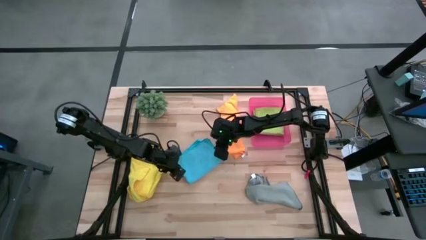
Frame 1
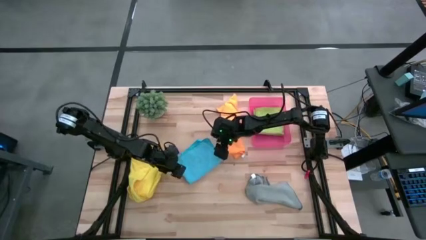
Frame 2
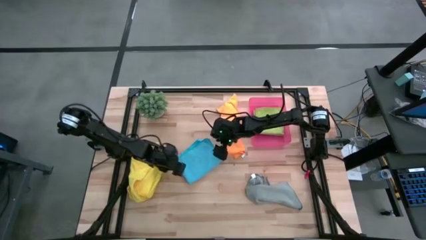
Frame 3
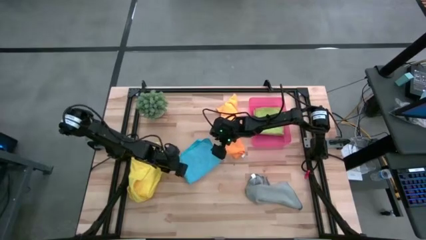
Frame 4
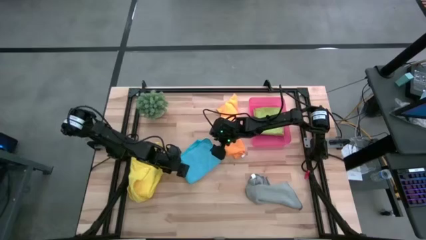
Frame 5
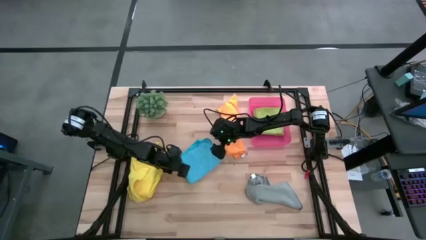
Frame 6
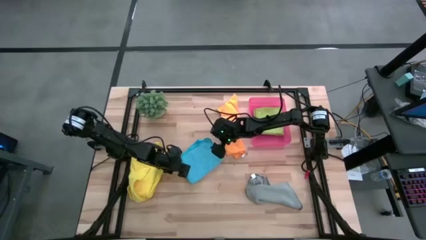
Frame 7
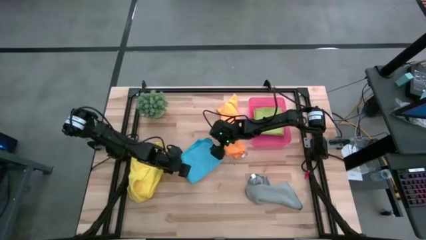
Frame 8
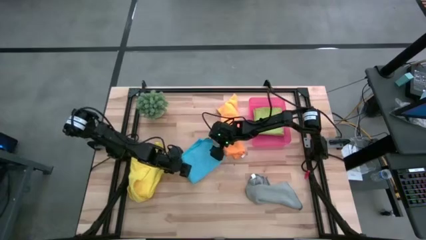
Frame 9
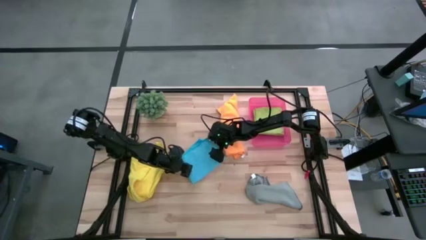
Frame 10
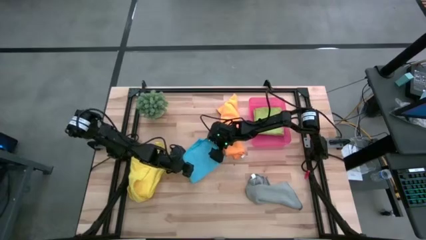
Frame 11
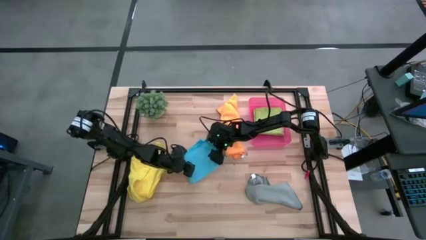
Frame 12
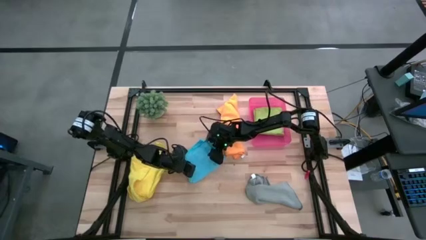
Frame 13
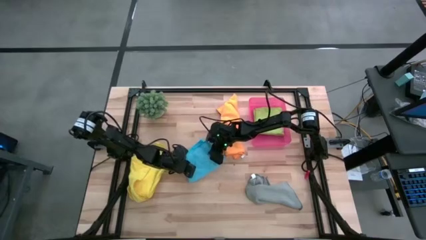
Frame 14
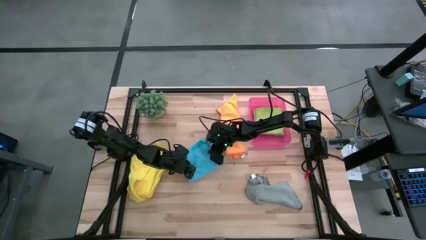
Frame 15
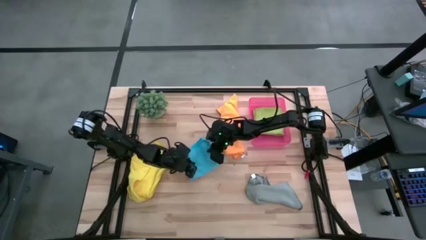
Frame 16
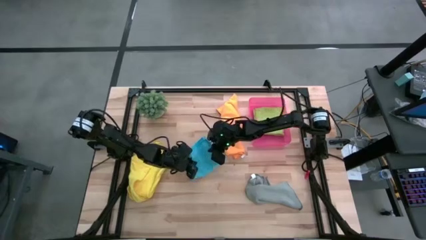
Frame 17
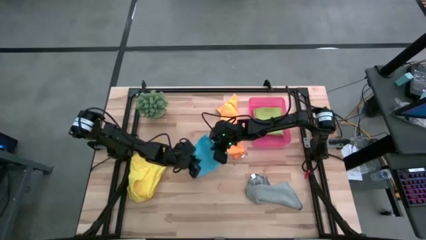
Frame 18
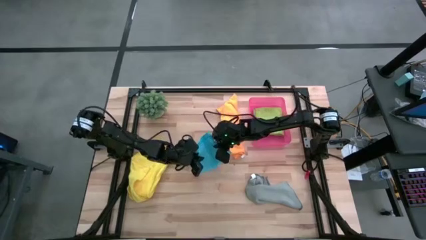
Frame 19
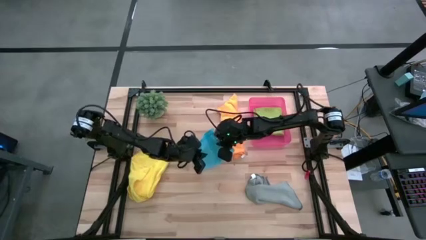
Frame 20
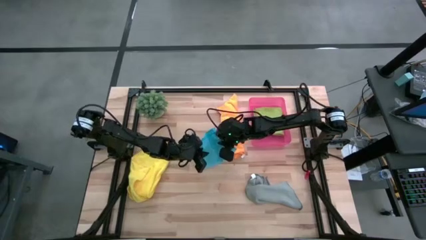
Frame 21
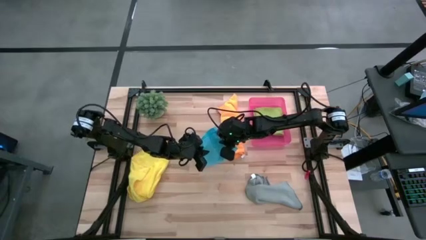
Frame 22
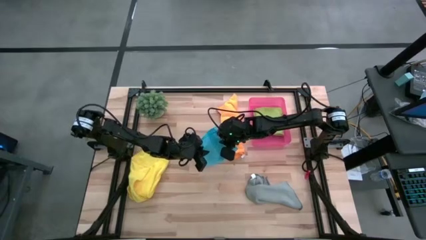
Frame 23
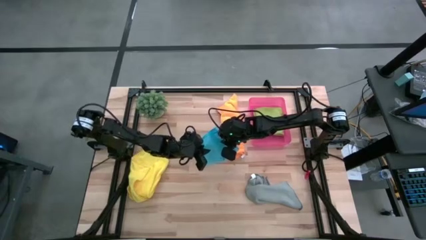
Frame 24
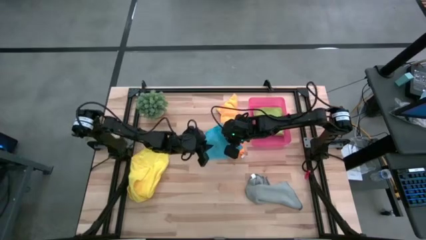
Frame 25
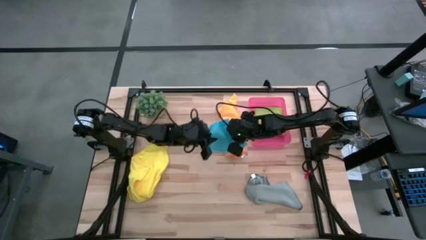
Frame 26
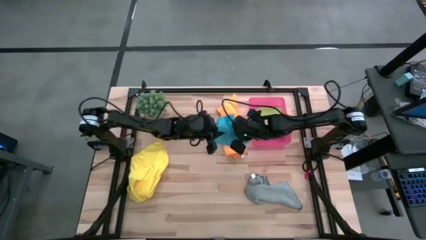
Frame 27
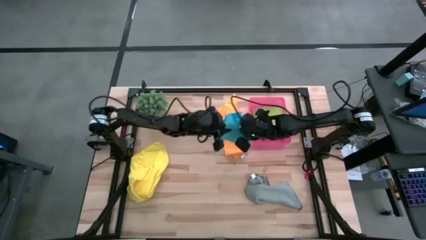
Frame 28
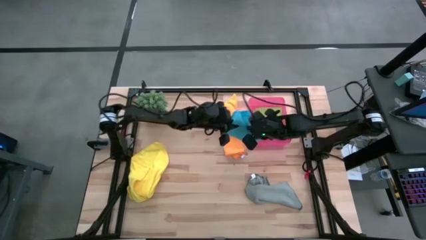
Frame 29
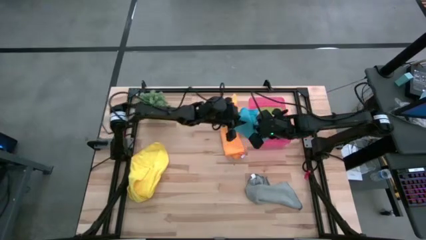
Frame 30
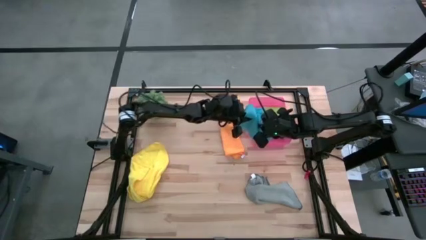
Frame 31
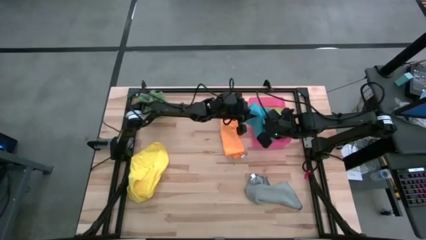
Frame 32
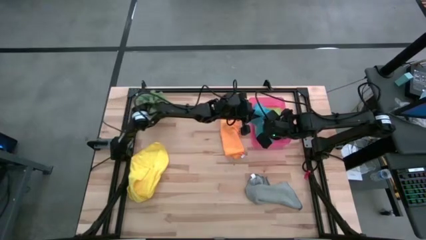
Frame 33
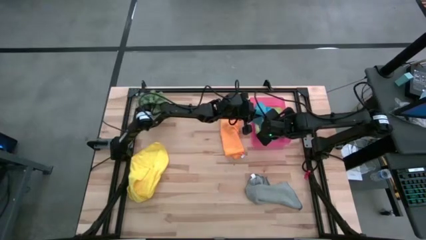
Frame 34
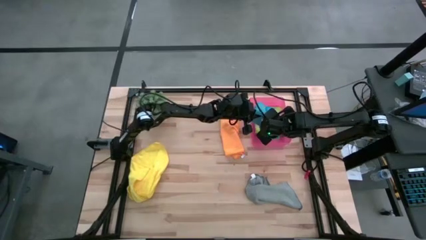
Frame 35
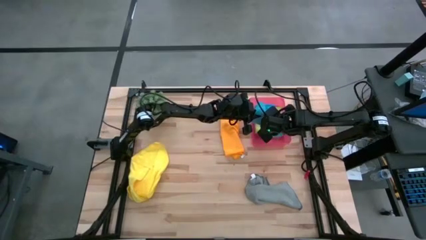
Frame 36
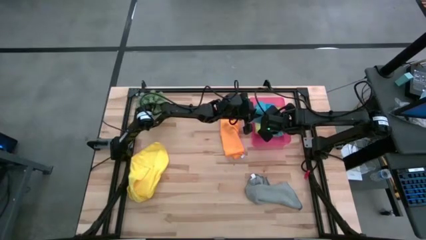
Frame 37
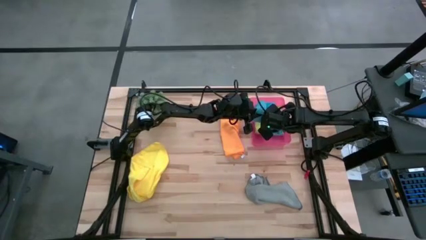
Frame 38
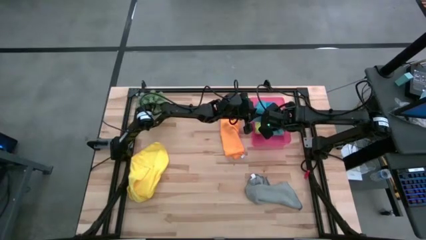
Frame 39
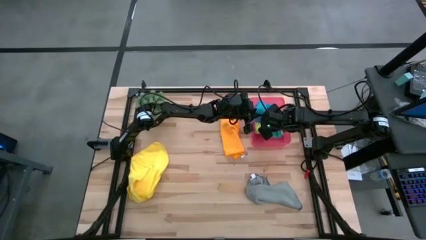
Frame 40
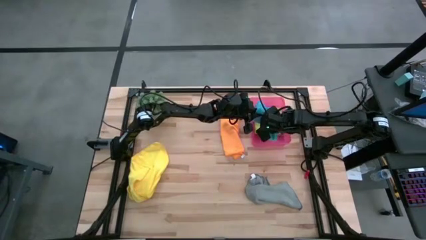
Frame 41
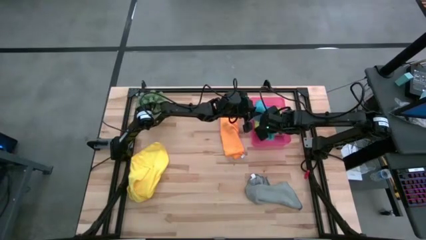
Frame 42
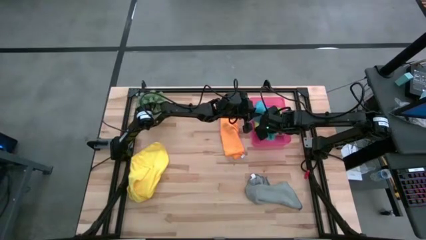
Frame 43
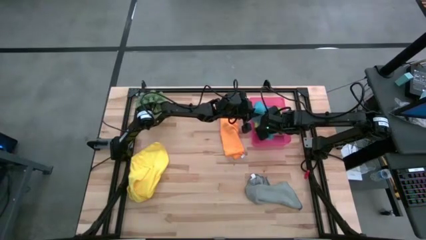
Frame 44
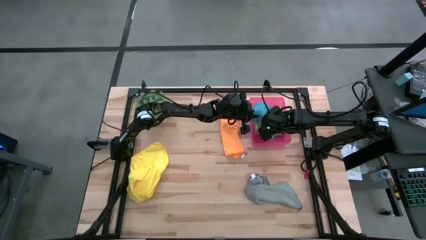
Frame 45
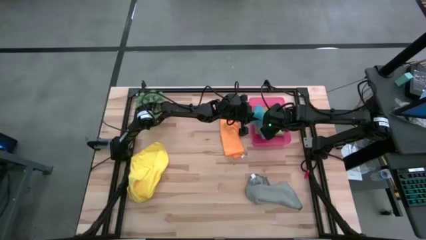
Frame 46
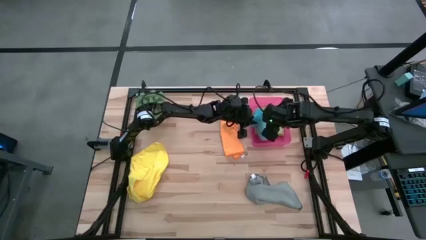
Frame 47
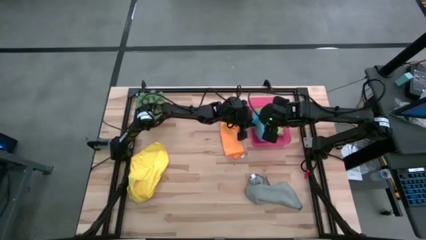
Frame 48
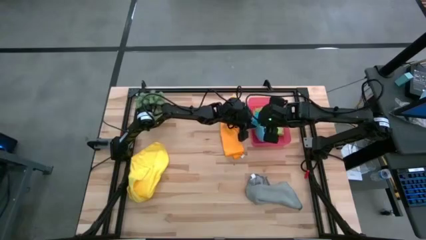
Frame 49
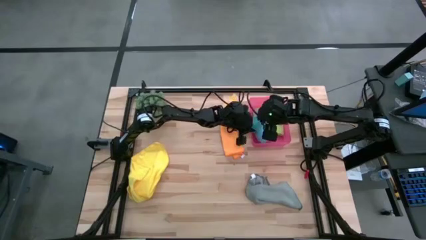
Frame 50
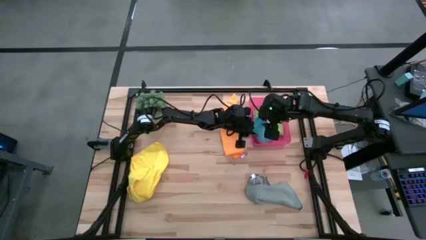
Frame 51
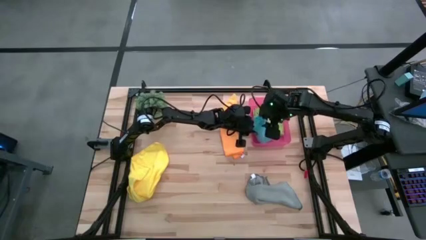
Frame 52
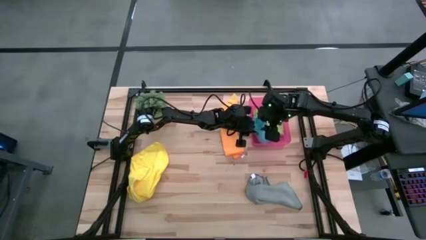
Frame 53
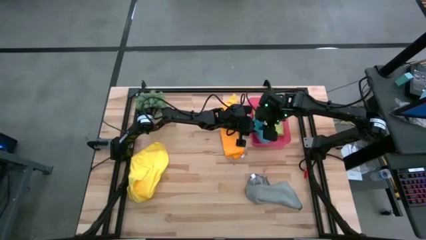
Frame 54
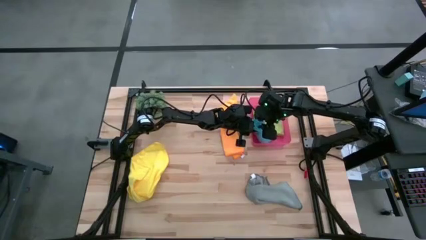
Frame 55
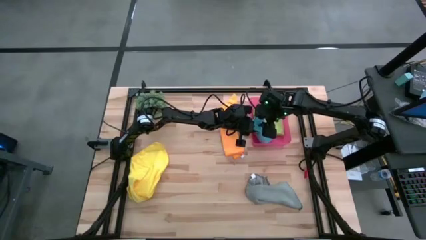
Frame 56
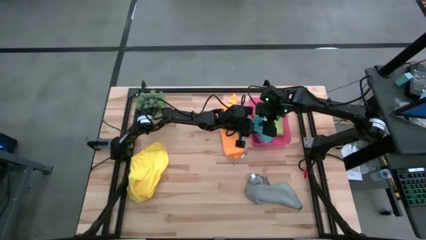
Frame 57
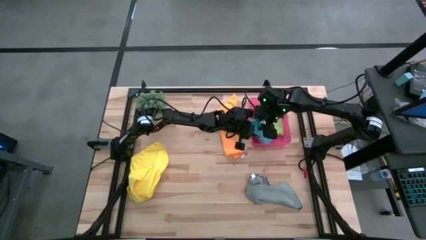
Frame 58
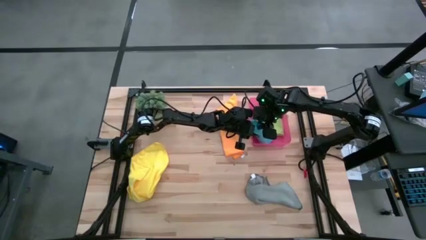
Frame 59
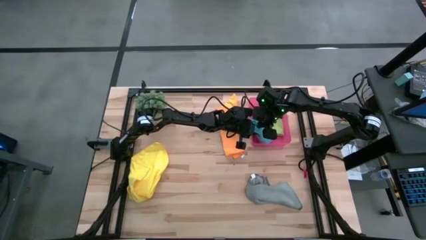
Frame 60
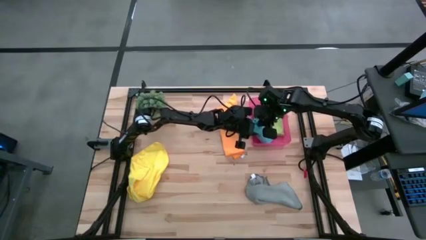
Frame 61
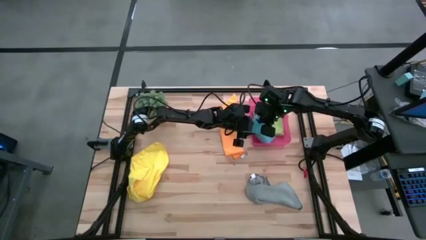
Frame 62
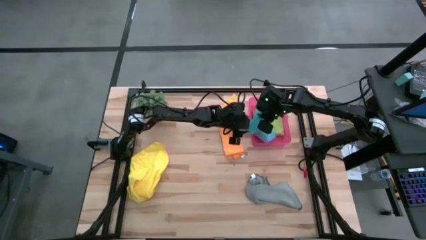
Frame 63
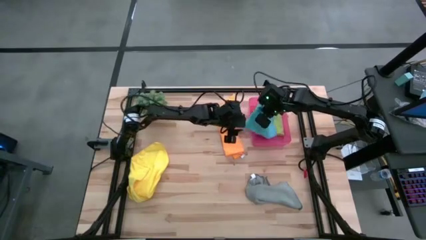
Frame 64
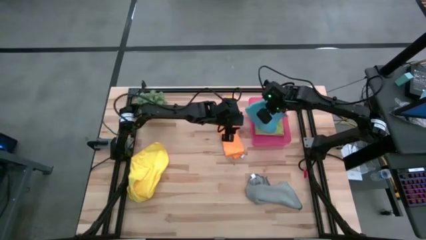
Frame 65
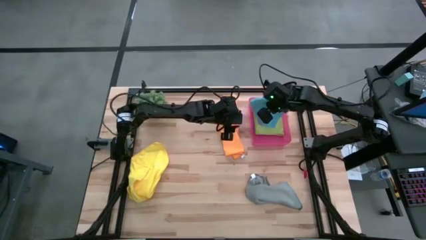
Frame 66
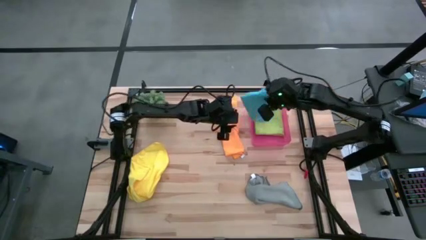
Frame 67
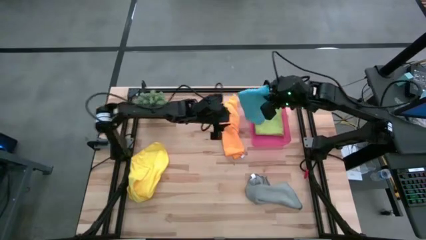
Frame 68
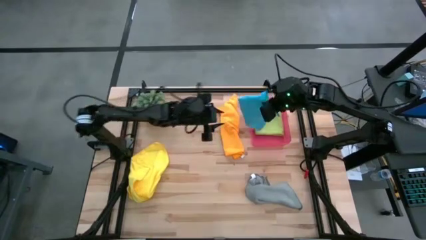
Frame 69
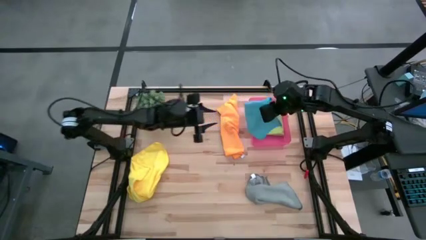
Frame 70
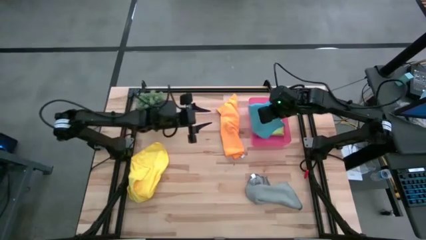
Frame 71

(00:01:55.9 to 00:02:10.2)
Task: Fold microfiber towels
Put the blue microfiber cloth into the pink bin
